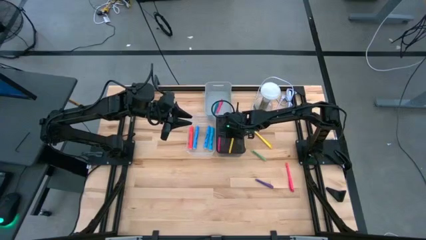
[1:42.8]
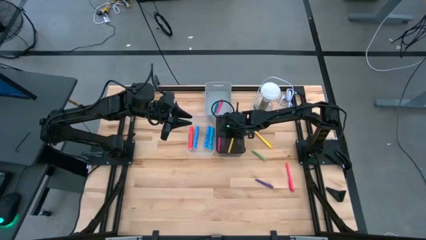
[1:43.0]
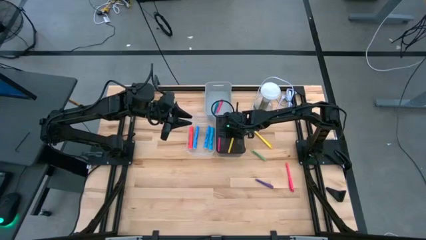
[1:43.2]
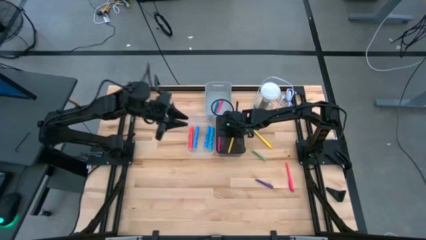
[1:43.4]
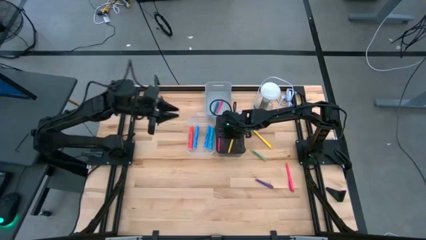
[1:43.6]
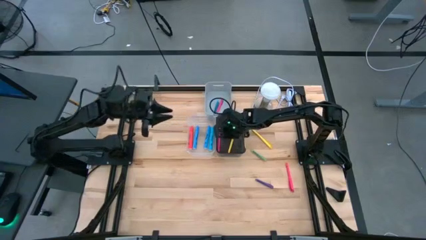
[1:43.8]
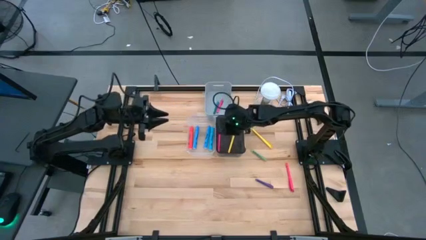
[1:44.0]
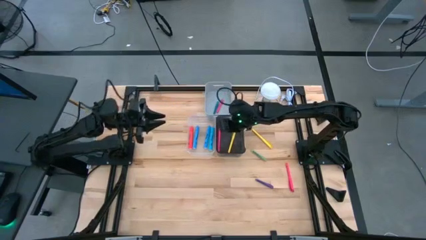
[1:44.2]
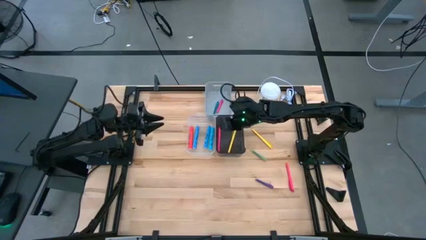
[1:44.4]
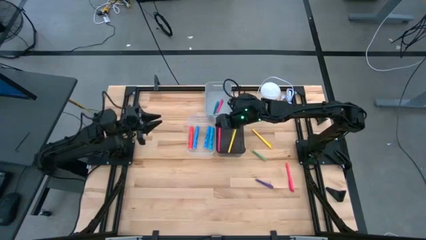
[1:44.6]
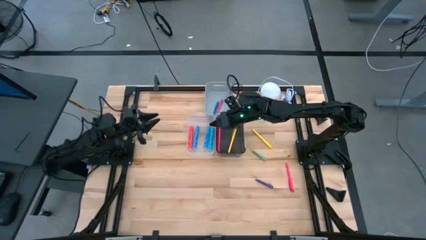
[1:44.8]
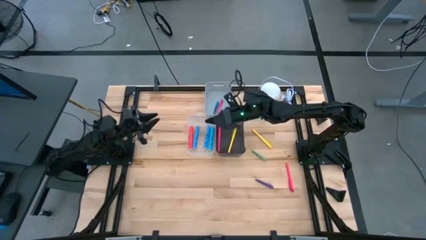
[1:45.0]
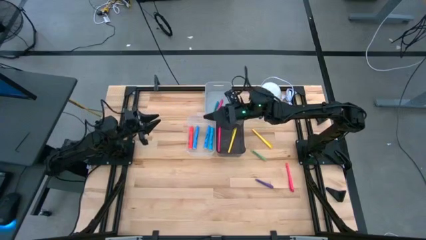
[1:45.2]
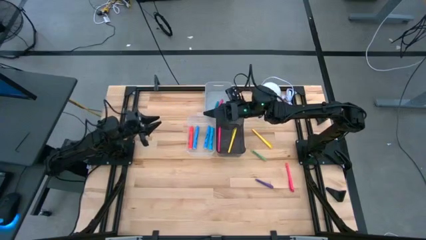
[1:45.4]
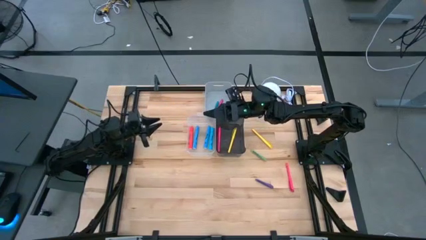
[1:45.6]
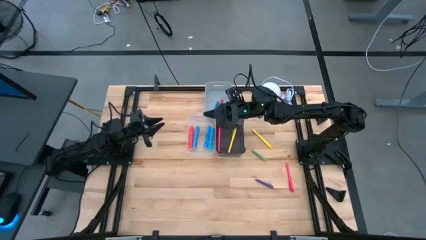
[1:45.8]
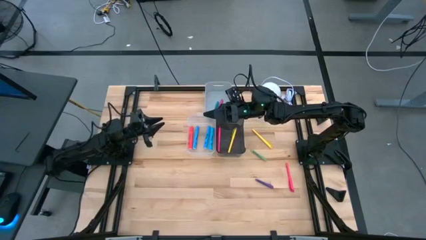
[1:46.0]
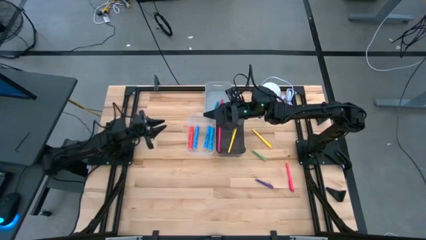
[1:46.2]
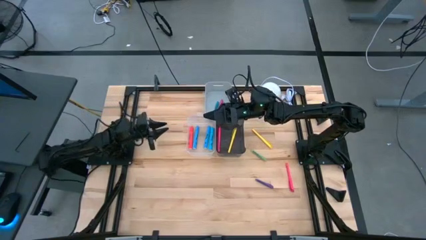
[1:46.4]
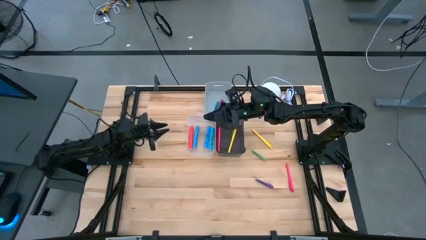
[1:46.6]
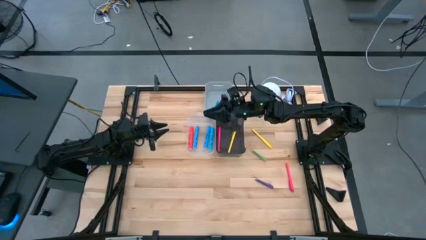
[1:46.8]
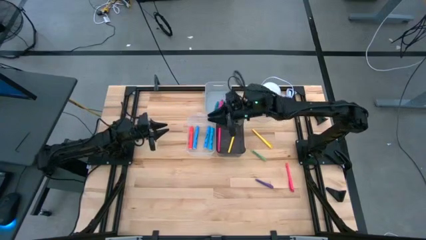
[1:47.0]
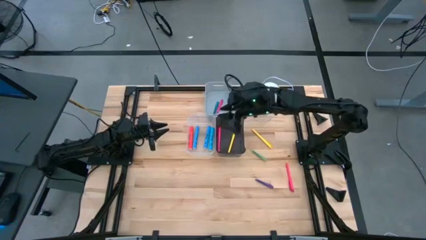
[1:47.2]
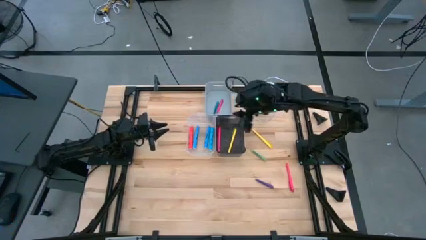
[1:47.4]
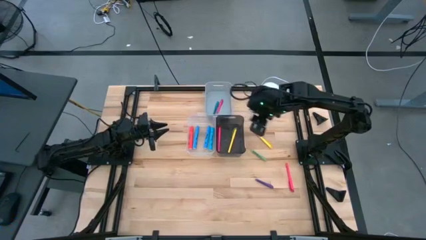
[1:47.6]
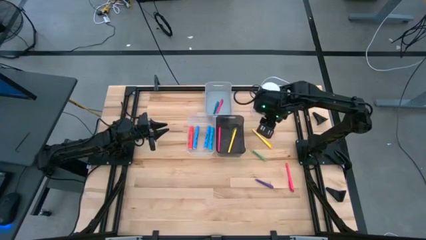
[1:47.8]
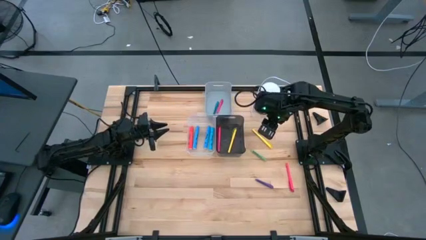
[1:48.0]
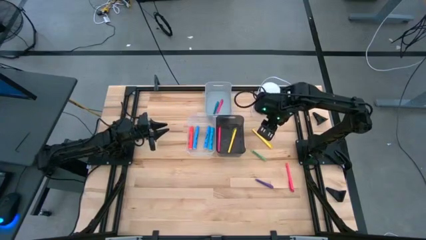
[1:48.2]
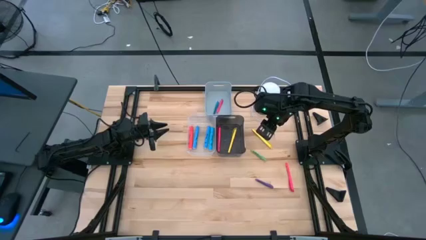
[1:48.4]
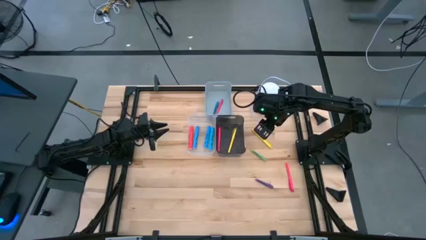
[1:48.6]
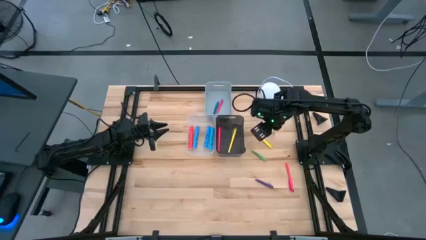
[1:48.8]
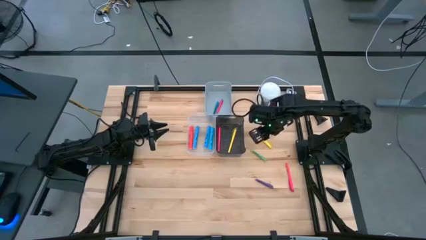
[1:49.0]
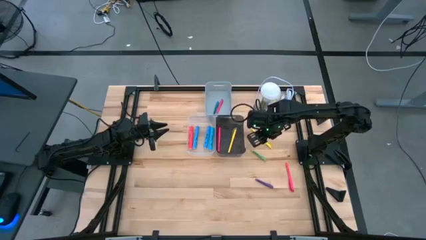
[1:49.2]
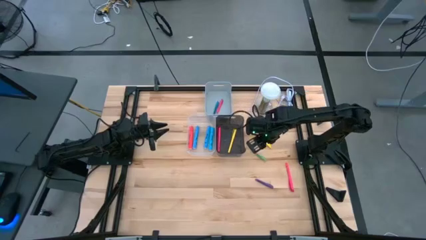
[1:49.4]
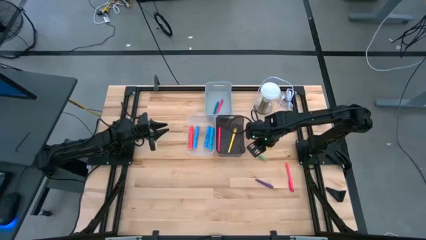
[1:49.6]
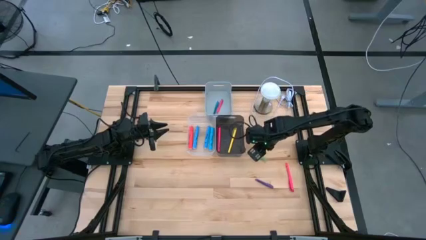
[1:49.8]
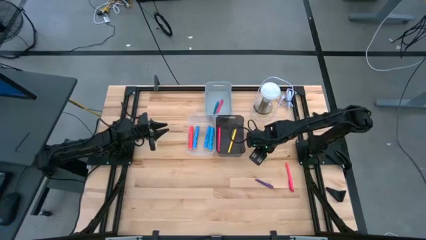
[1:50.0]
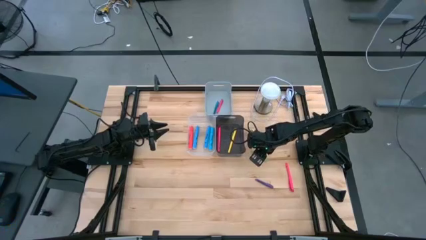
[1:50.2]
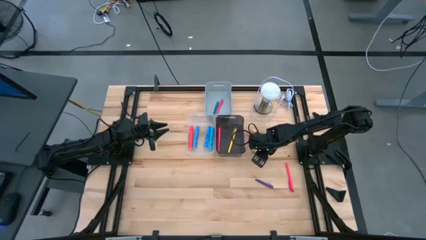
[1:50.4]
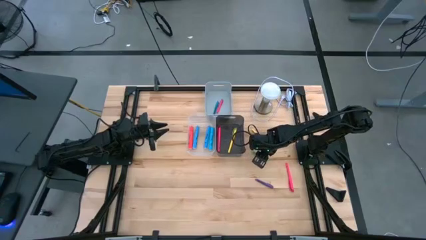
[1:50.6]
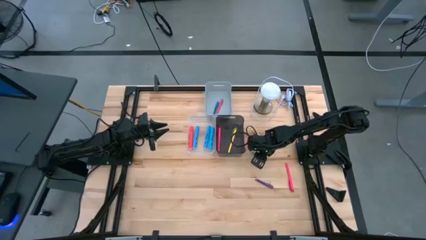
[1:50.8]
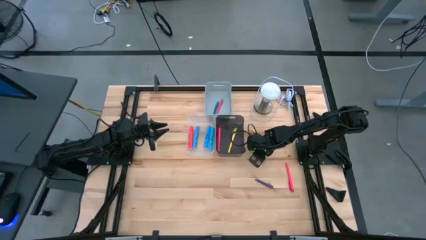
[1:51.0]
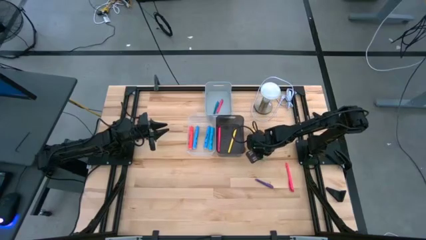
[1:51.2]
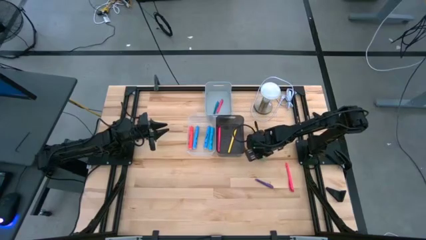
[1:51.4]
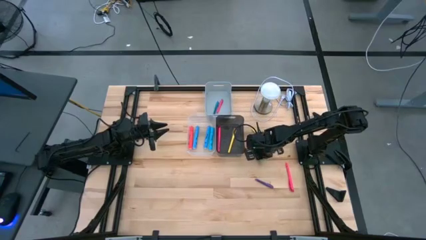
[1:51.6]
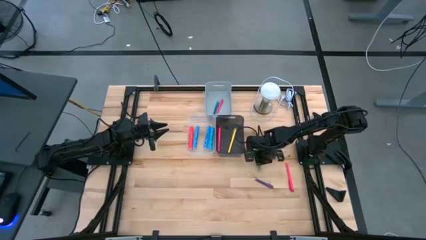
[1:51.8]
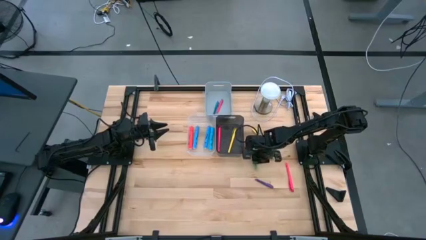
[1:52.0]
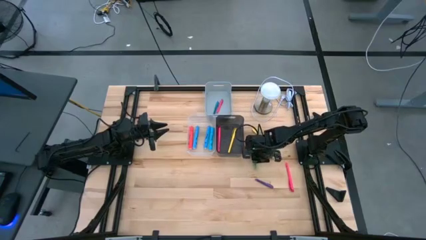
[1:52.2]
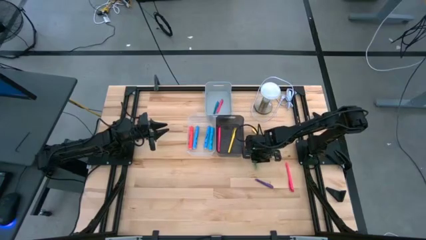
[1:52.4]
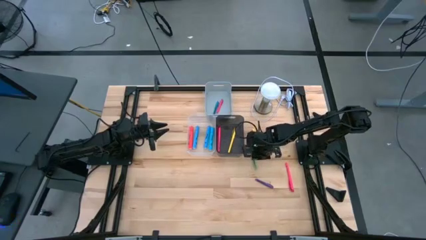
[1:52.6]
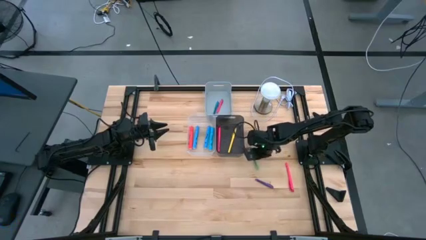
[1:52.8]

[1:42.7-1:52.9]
Task: Pick & Place Markers
Put the green pen into the gray bin
